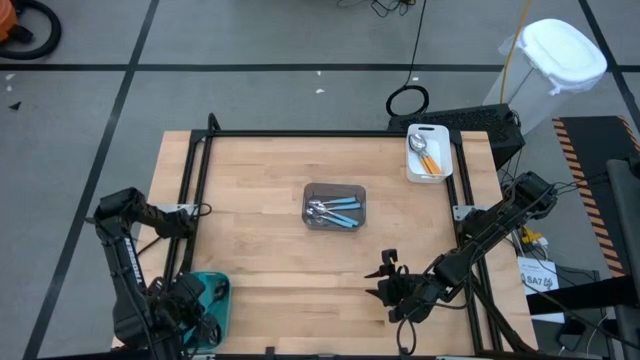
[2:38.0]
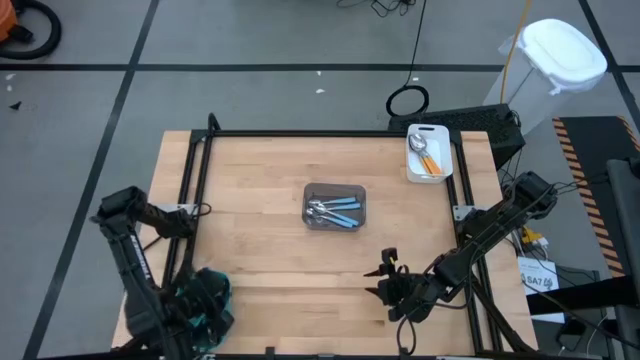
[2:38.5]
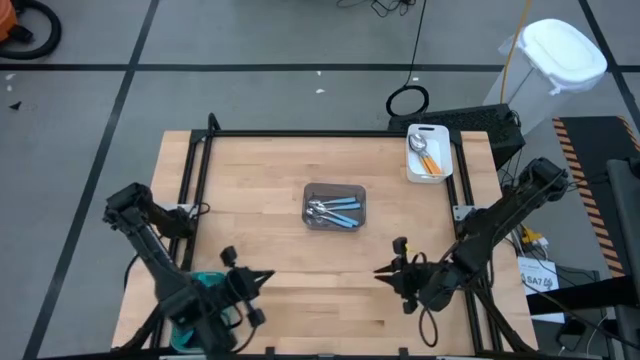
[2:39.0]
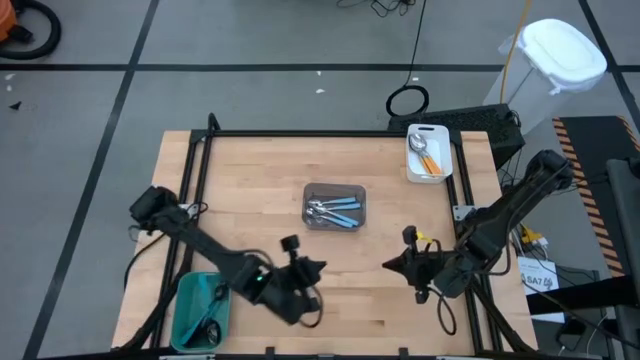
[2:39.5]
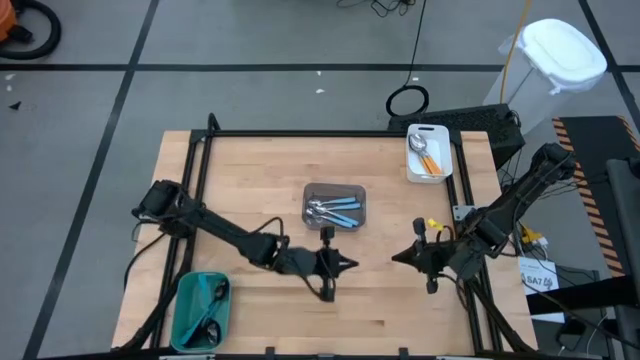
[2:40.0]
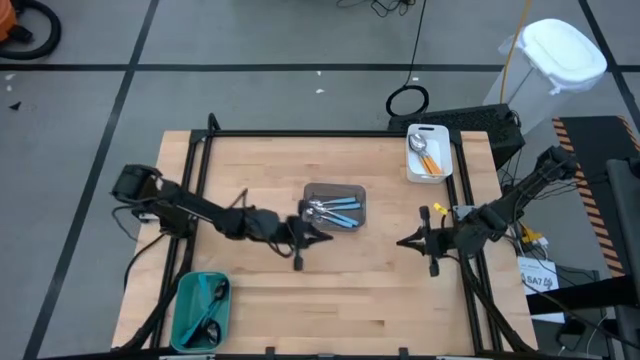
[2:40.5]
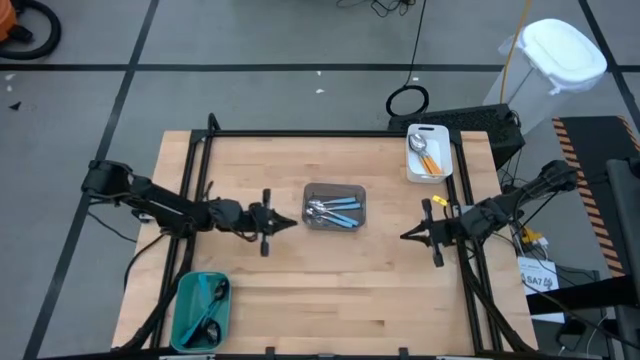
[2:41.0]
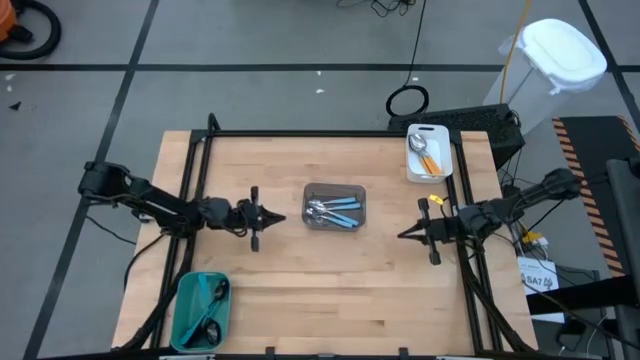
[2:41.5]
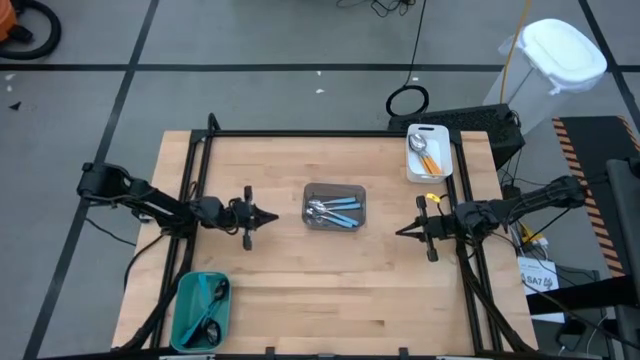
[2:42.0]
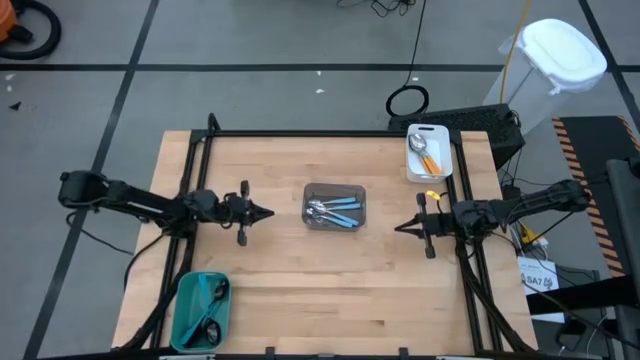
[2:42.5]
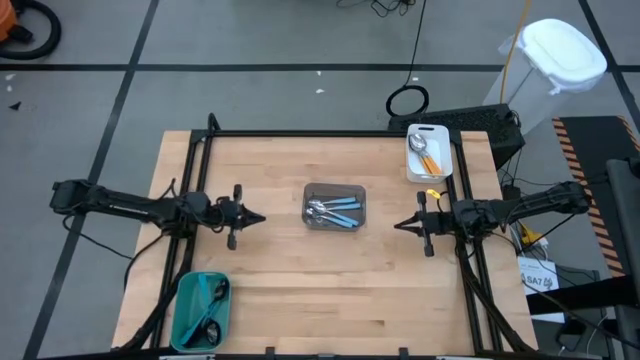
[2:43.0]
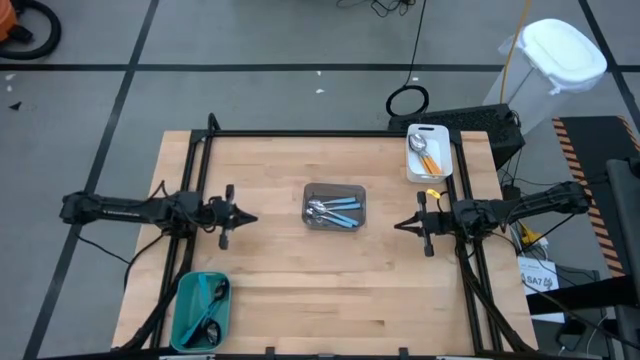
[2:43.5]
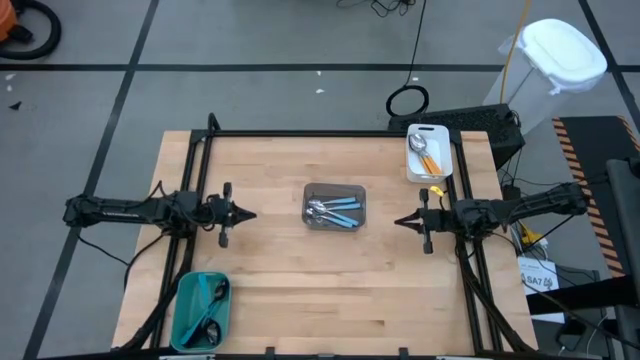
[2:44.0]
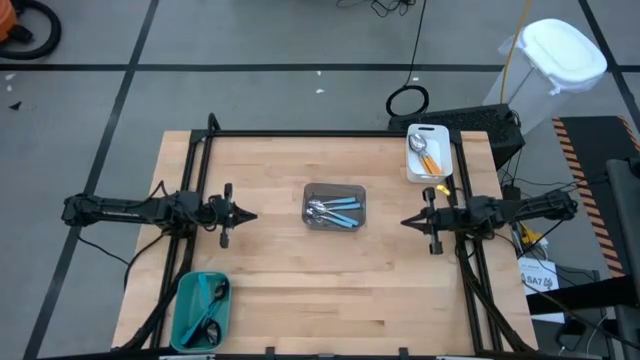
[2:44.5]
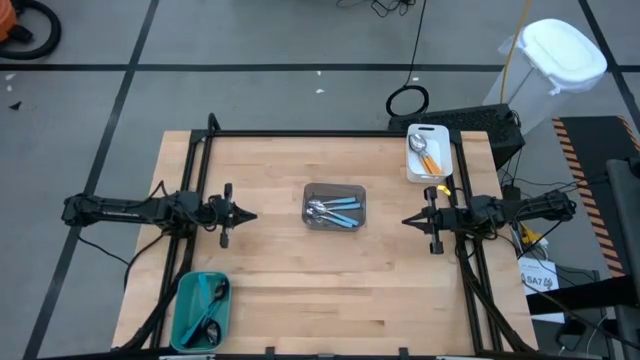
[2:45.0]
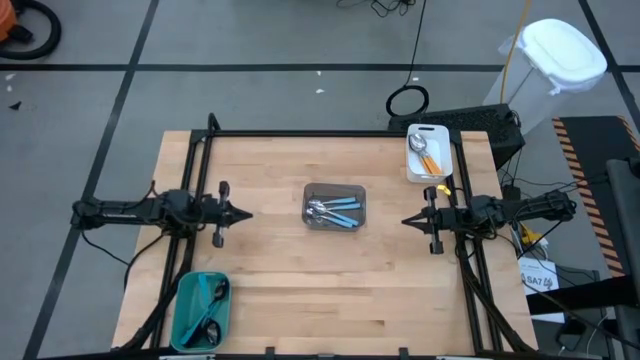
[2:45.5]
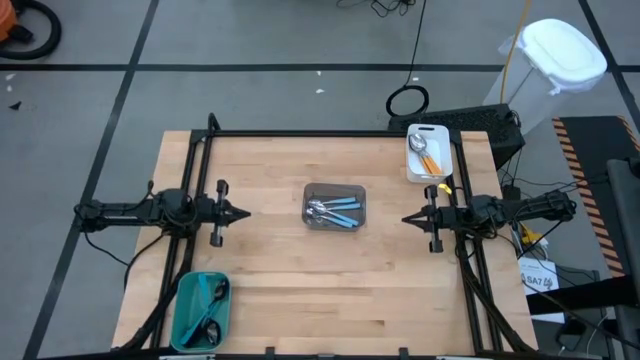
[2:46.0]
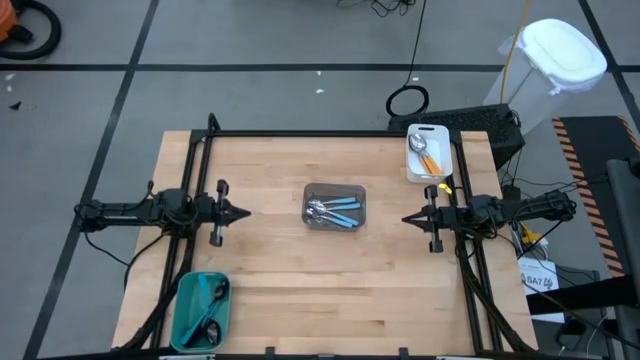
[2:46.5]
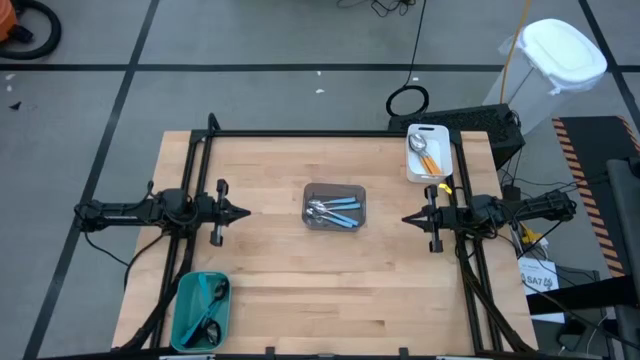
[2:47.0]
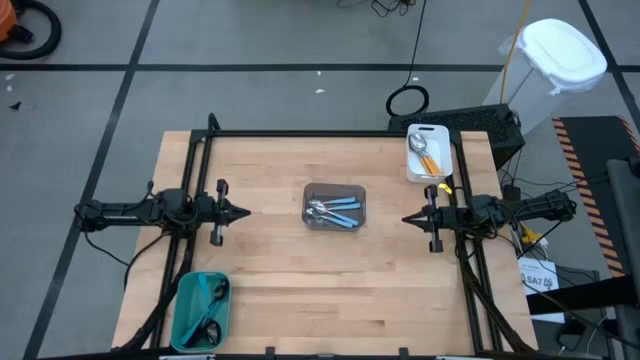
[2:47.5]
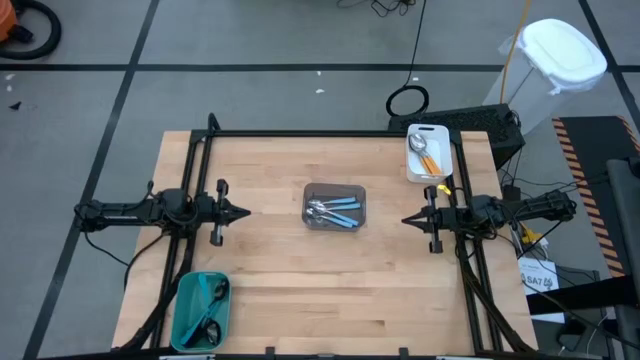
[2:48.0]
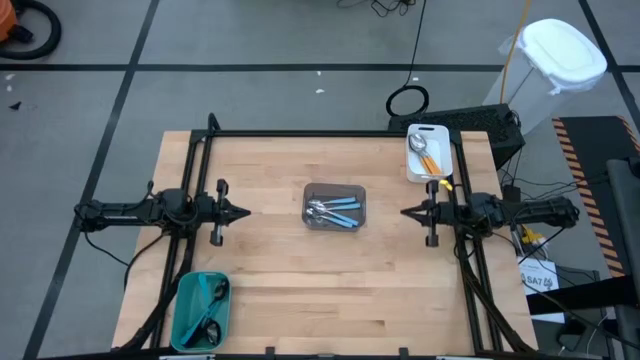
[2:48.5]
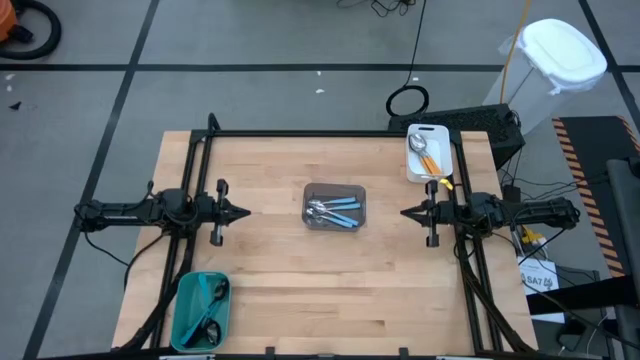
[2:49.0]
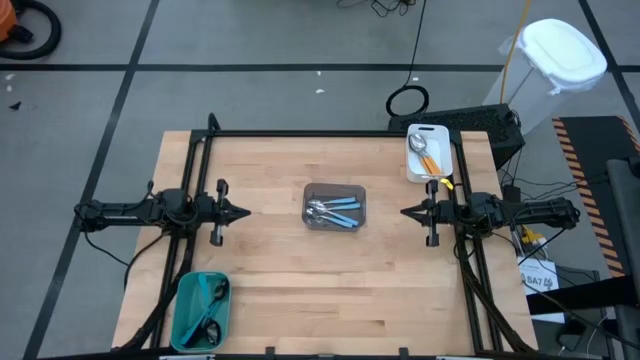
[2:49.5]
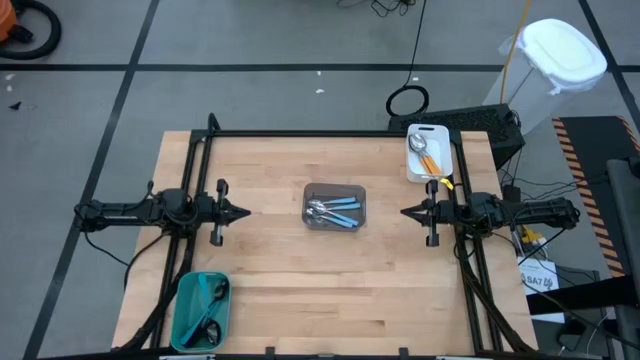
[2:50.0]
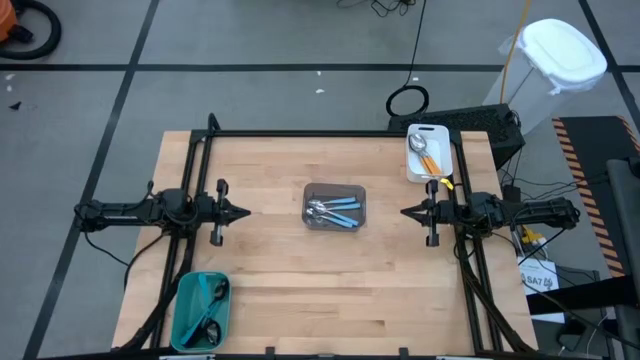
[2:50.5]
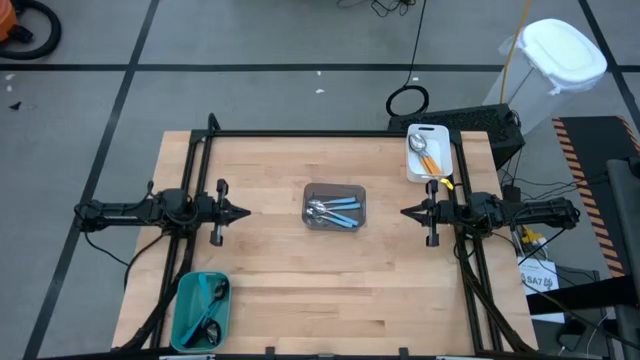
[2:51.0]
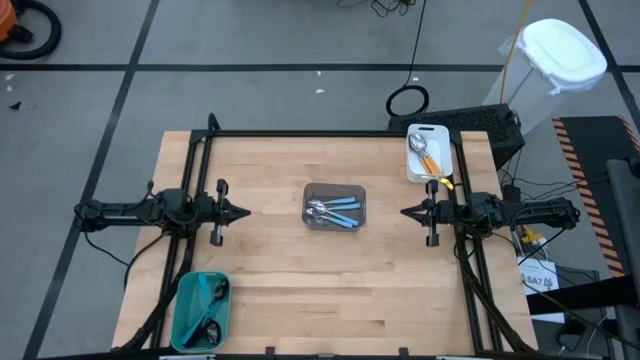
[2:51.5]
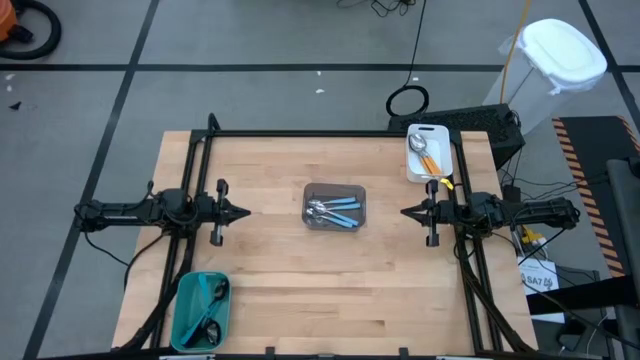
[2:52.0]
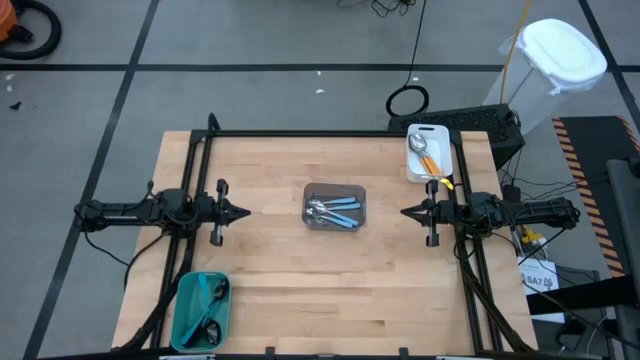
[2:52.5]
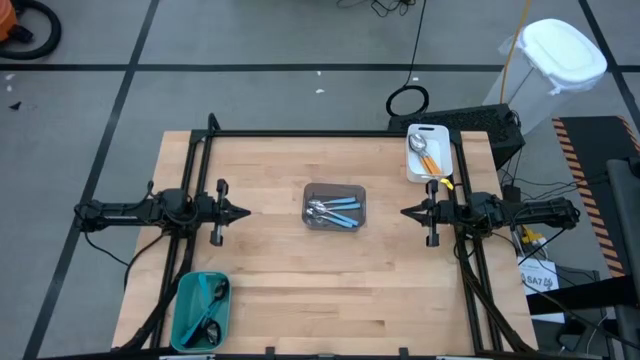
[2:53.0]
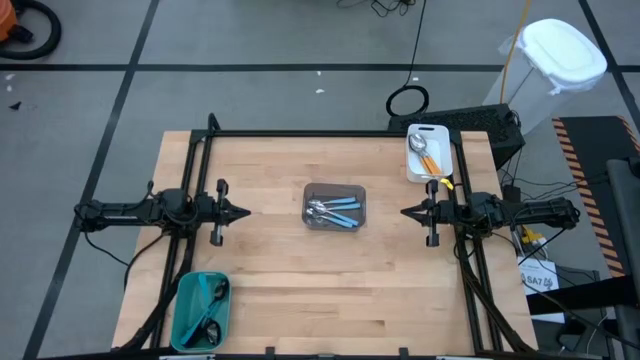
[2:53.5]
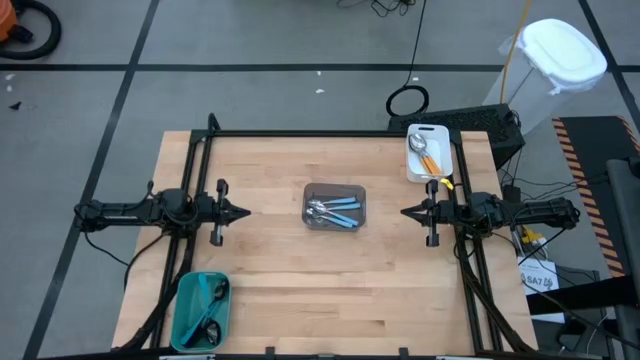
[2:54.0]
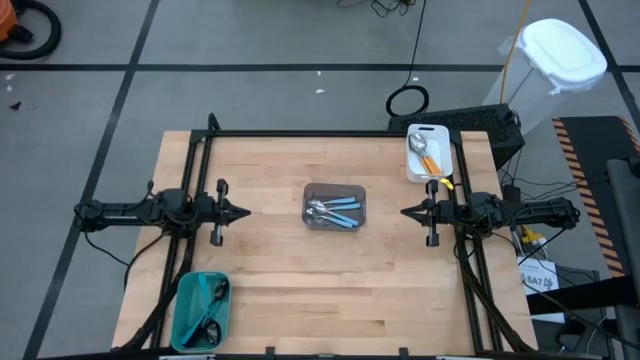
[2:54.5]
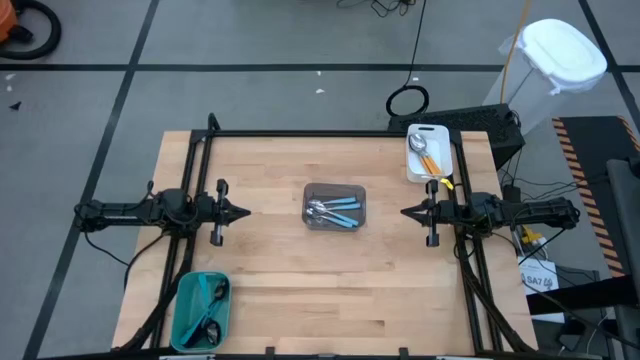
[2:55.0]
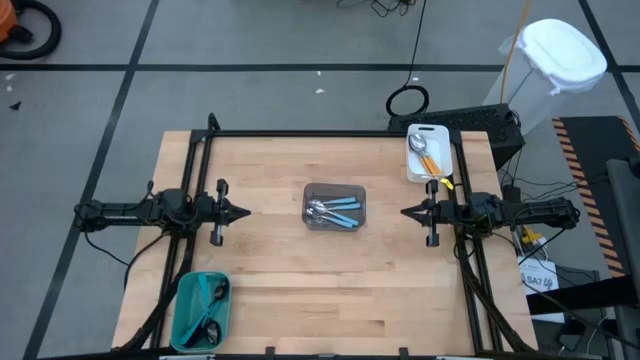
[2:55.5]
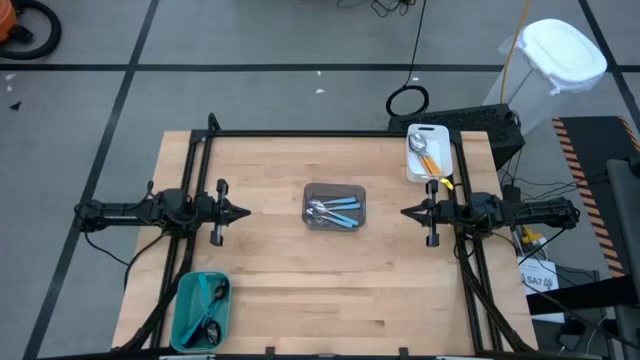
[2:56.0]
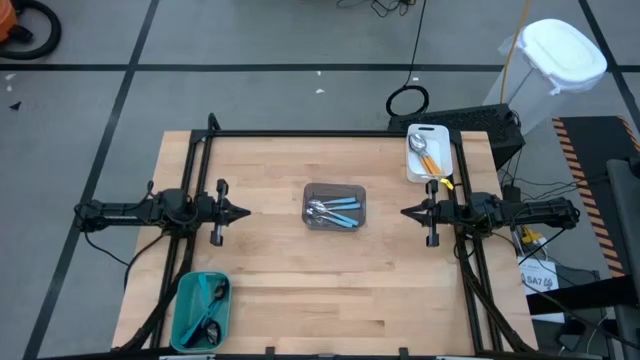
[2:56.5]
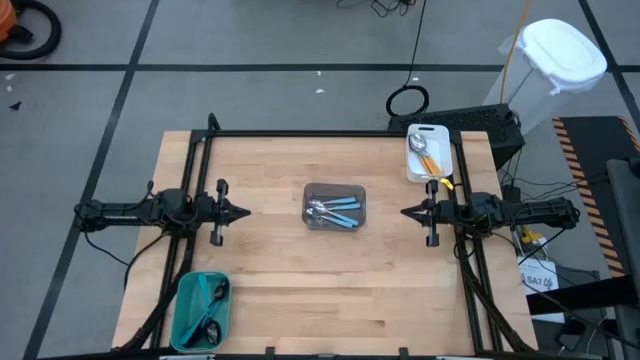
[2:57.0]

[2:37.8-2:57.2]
Task: Sort silverware by color (type)
Return to Home Position
